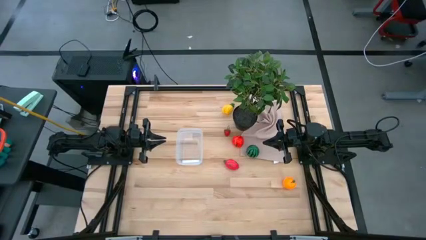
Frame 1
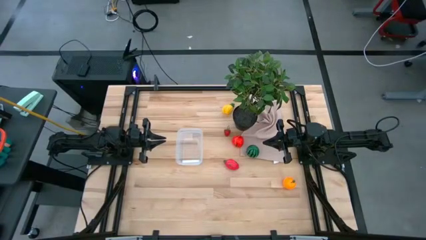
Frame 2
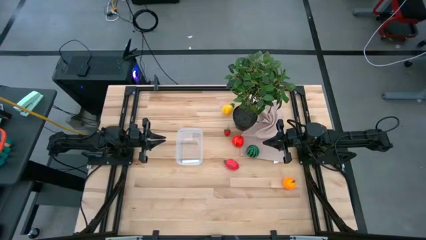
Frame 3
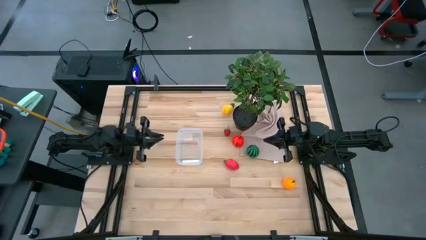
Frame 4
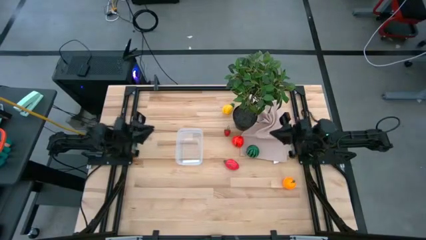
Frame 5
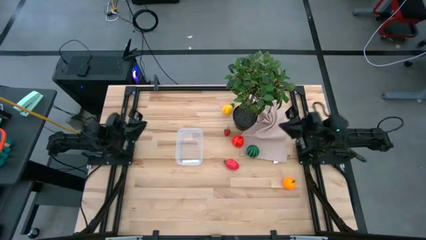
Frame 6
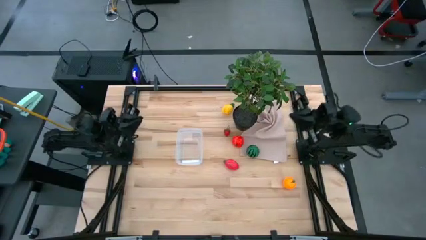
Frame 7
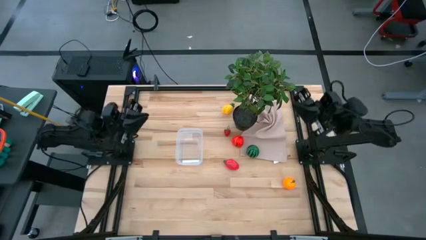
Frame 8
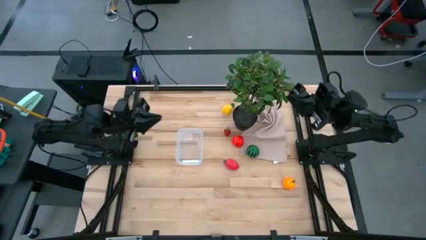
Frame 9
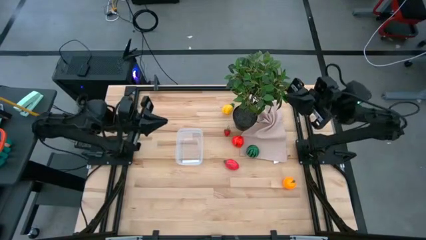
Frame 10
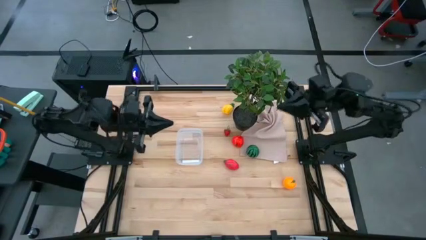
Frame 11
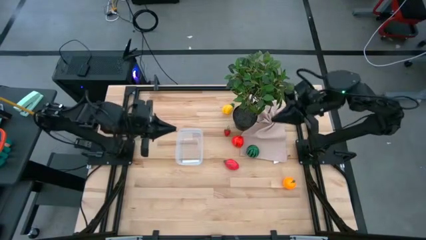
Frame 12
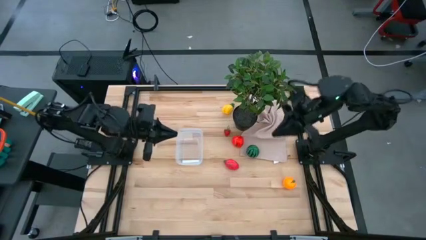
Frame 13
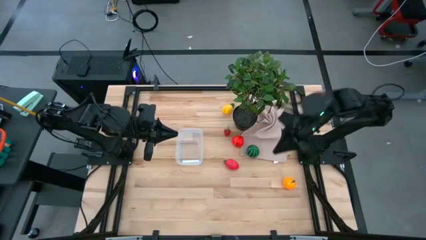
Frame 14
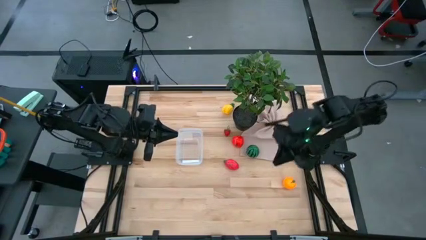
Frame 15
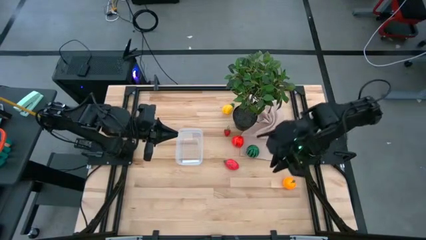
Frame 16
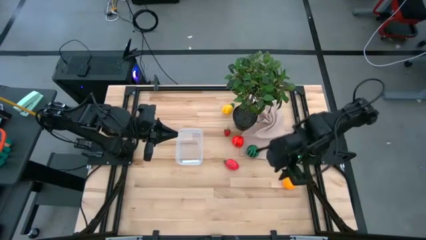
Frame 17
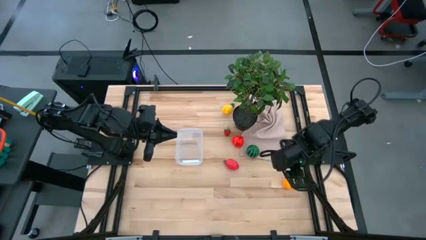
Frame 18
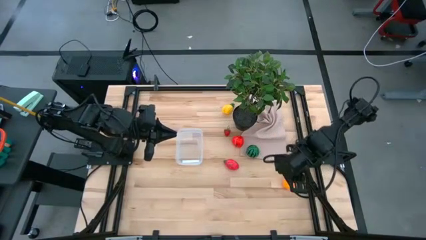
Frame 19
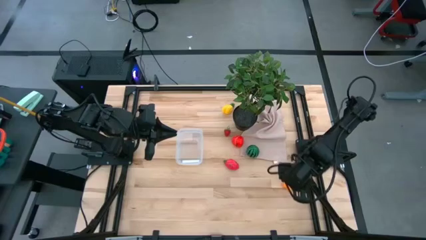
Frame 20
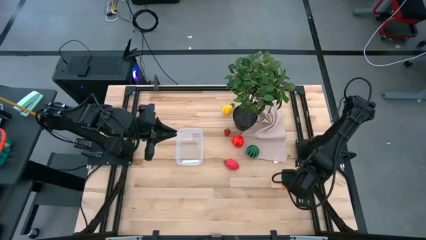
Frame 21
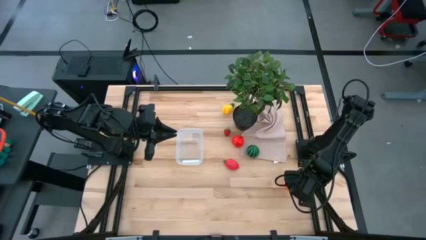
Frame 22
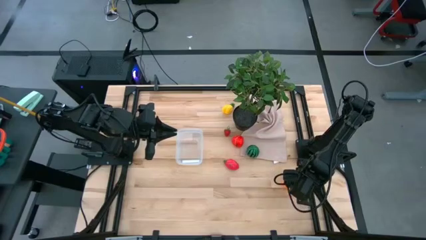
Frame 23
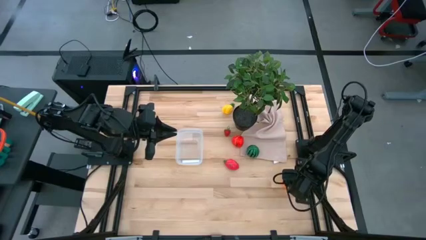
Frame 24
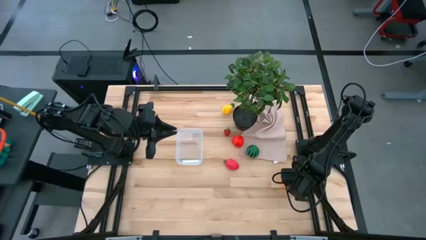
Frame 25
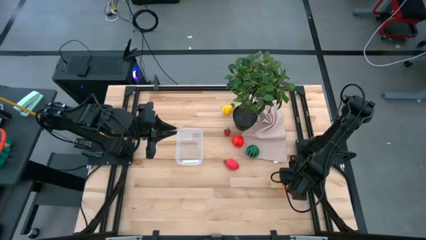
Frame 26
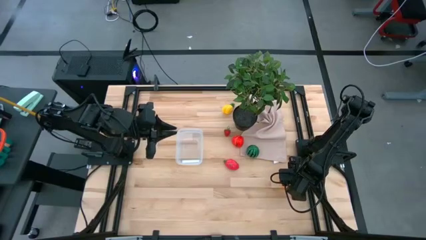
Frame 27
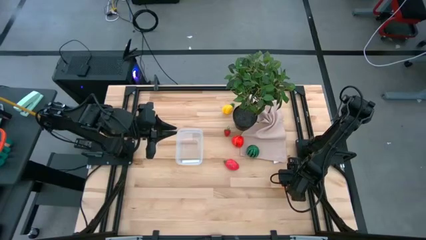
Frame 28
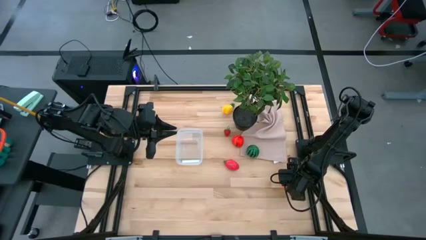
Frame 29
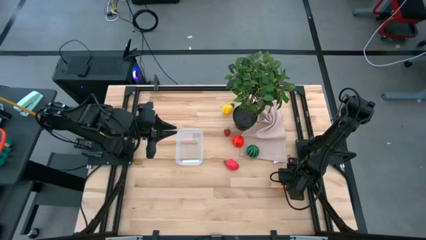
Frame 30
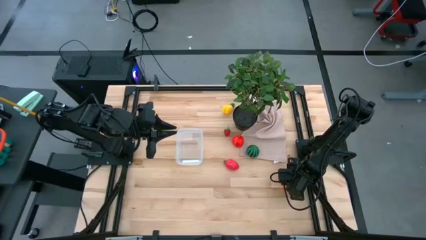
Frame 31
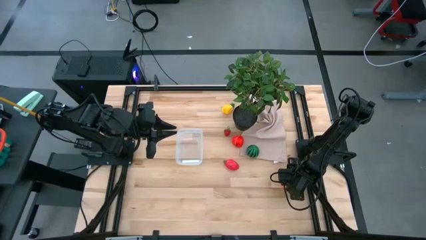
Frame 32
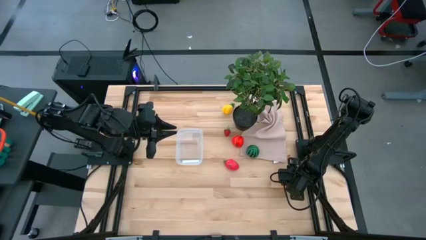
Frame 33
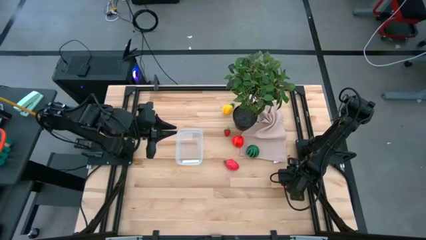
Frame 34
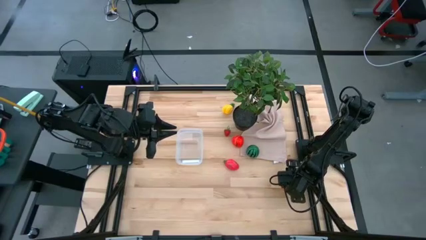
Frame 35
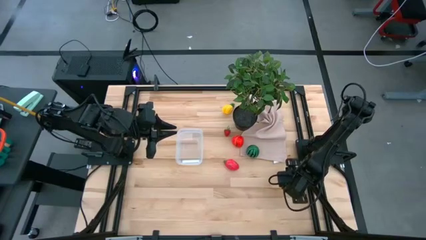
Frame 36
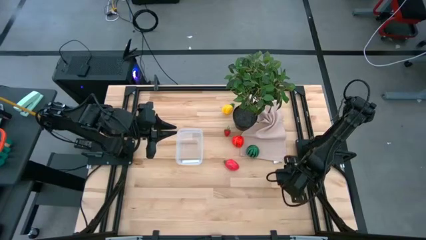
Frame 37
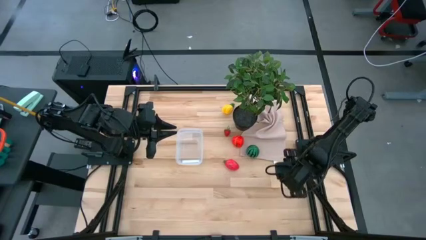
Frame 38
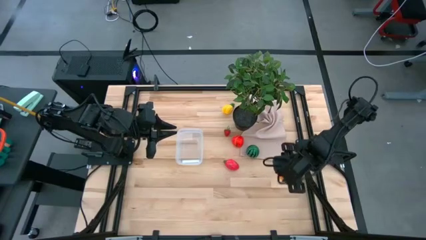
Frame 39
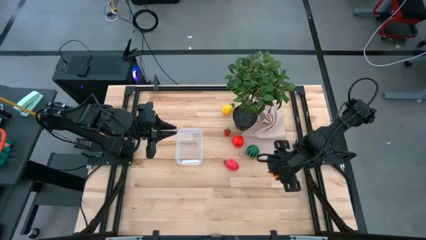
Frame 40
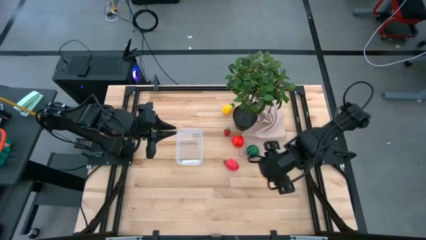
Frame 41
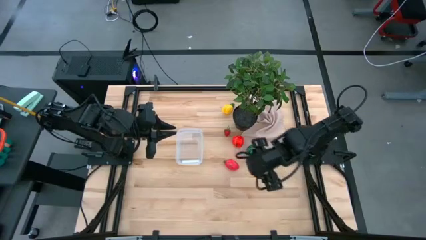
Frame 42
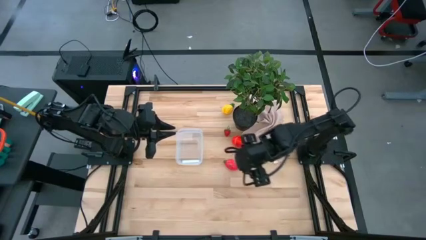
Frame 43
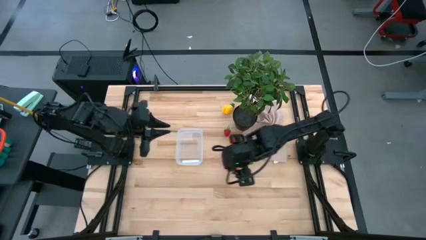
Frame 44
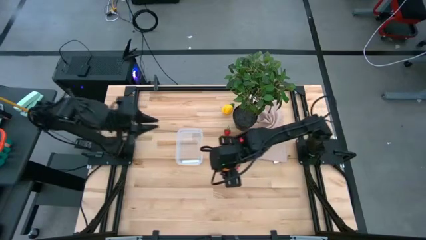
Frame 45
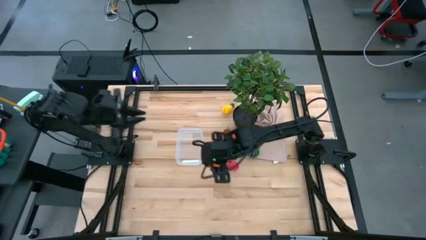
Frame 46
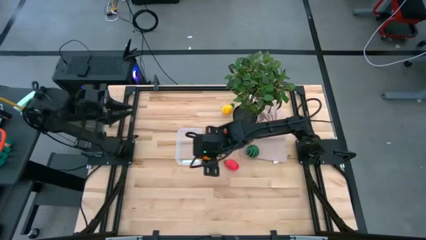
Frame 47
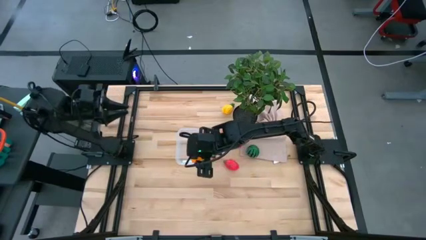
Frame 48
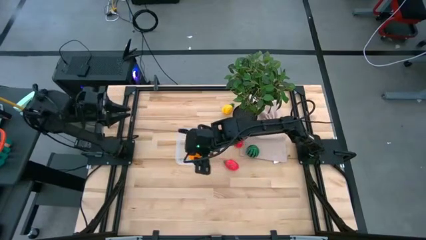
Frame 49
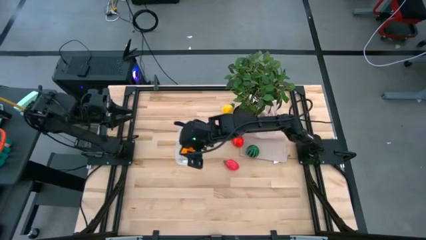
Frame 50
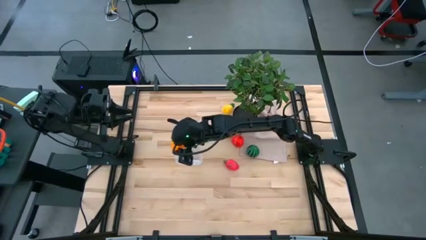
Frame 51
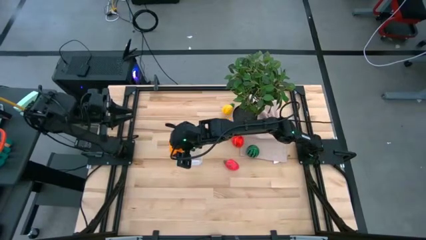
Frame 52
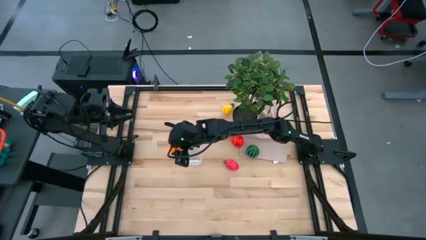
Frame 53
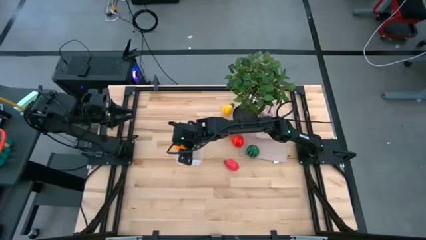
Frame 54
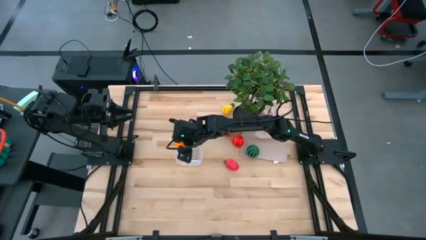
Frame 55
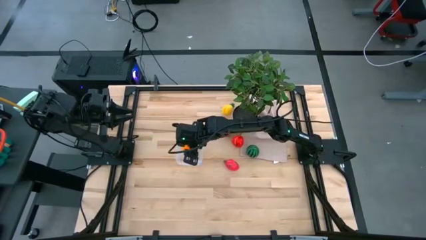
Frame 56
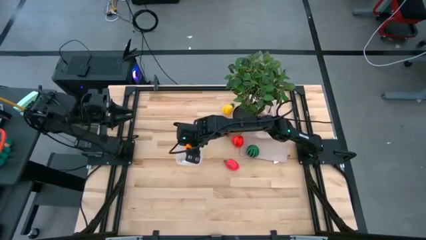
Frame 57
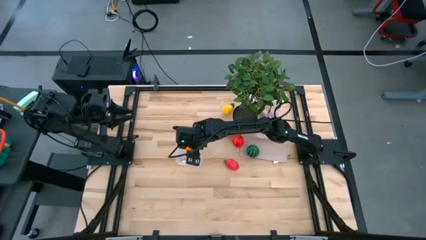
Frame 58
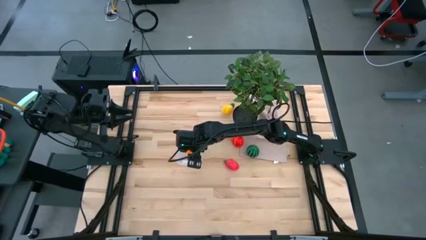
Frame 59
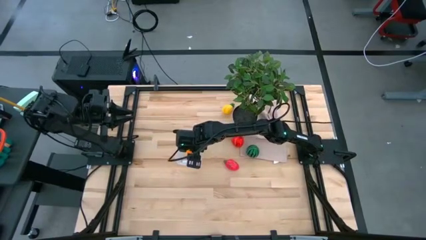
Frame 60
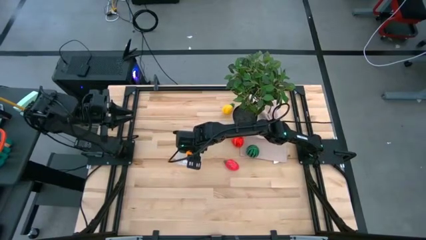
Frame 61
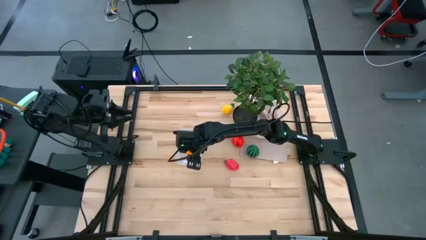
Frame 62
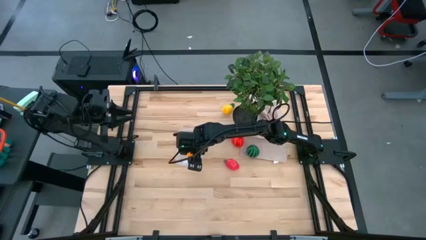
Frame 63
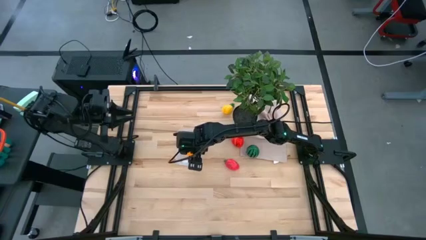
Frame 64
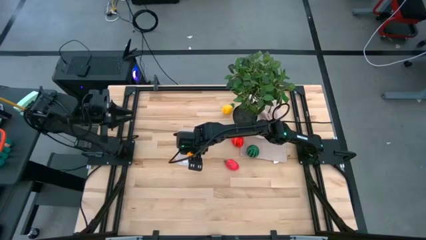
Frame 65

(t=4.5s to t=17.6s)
Task: Pick and placing Produce into tupperware
Put the orange into the transparent bin
